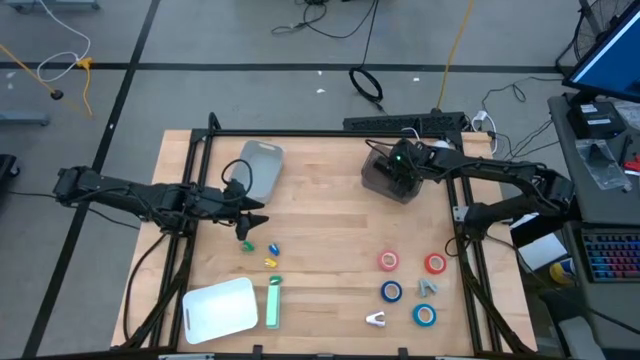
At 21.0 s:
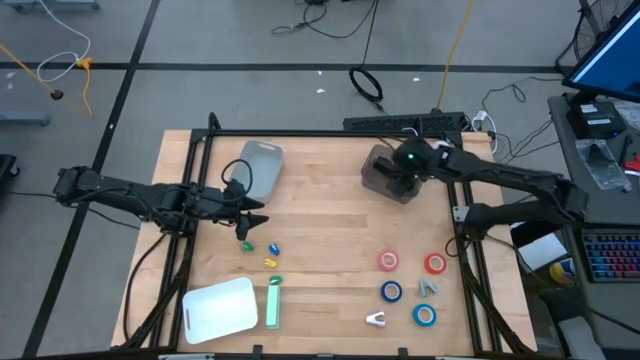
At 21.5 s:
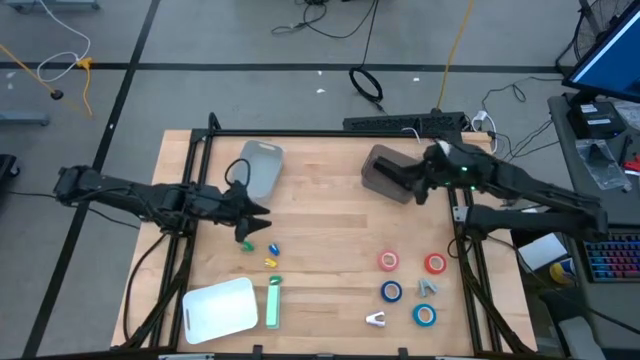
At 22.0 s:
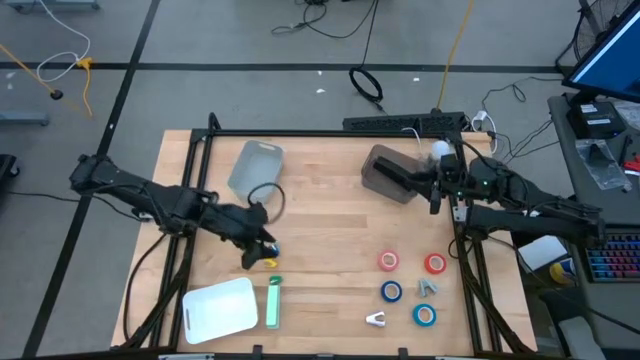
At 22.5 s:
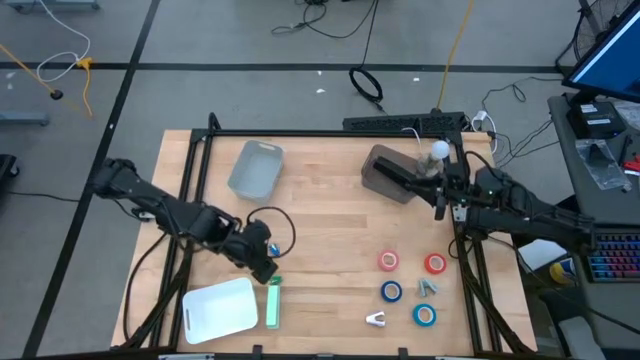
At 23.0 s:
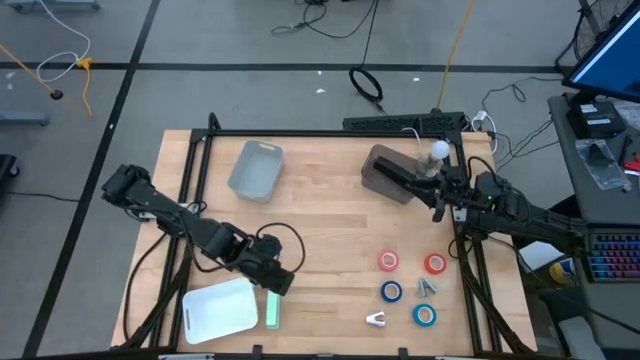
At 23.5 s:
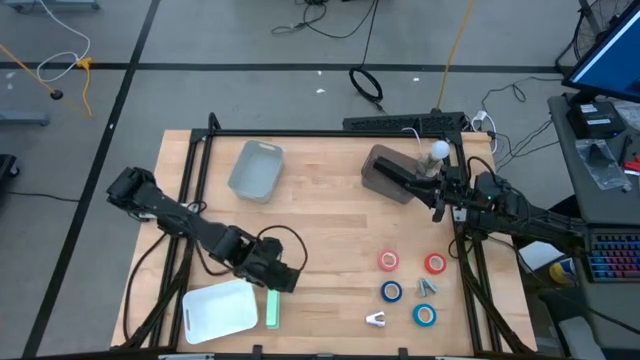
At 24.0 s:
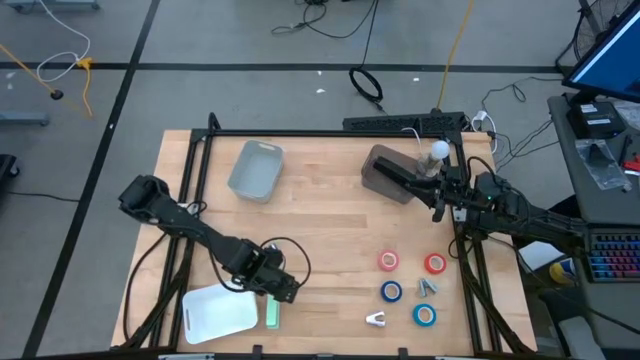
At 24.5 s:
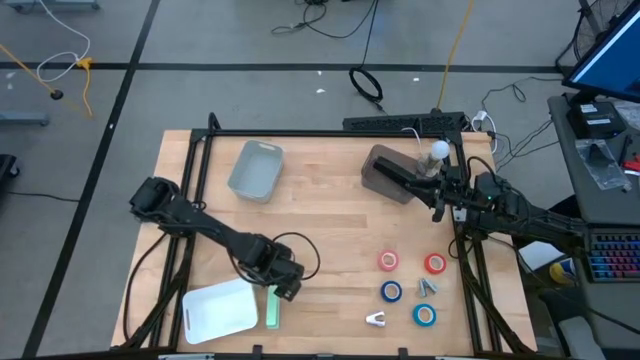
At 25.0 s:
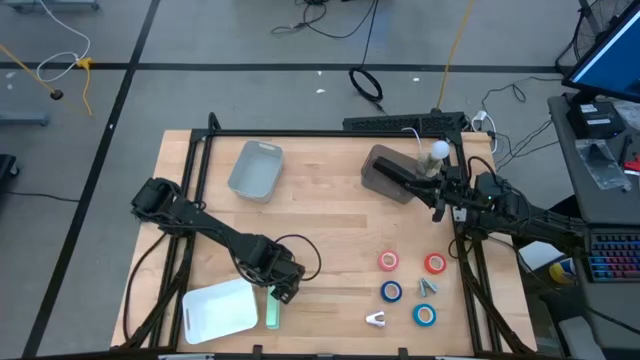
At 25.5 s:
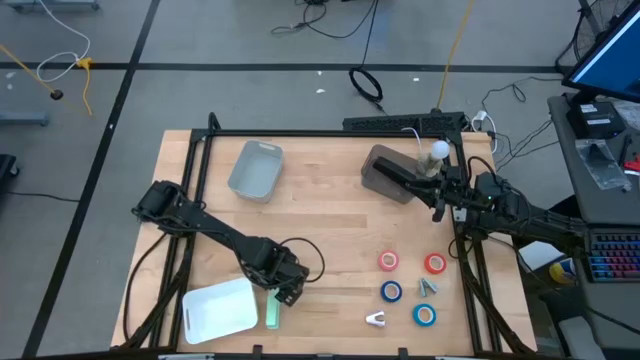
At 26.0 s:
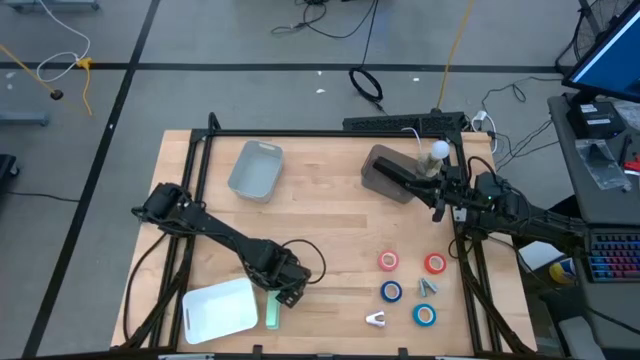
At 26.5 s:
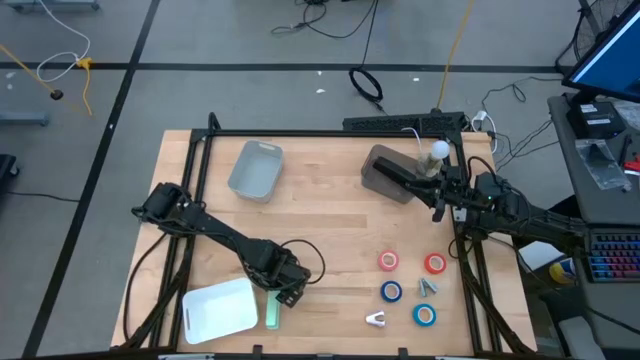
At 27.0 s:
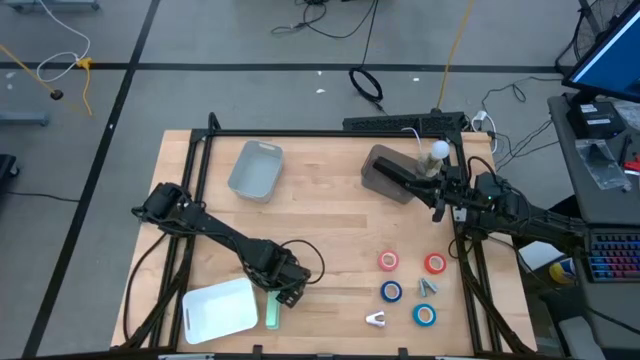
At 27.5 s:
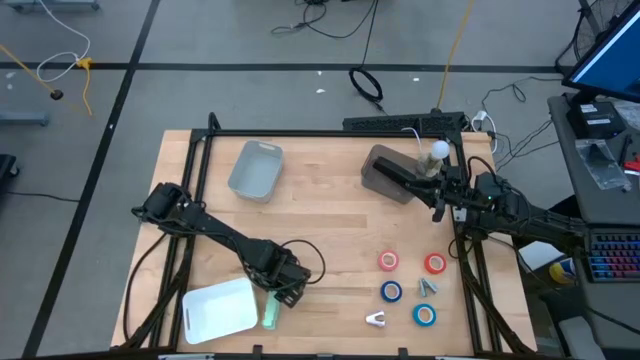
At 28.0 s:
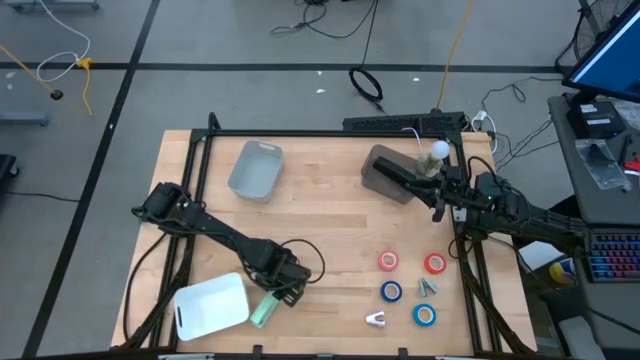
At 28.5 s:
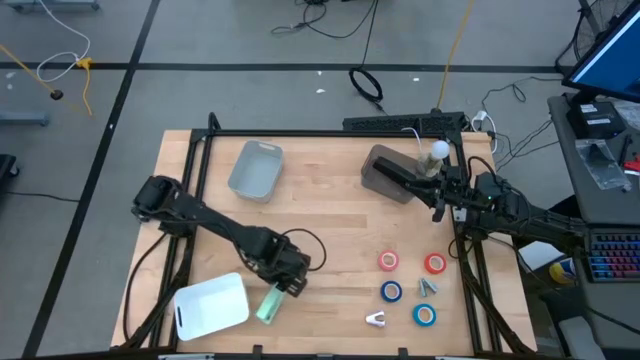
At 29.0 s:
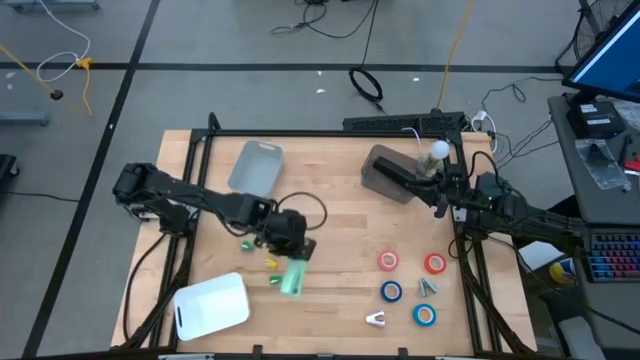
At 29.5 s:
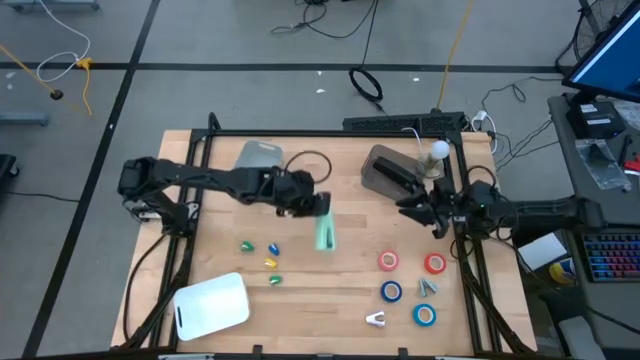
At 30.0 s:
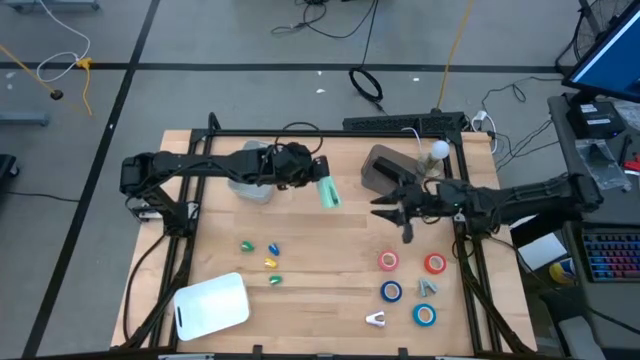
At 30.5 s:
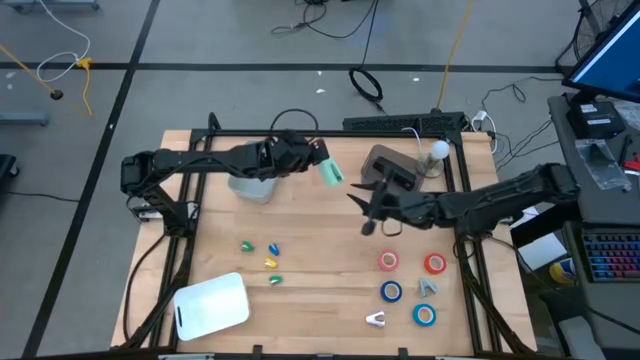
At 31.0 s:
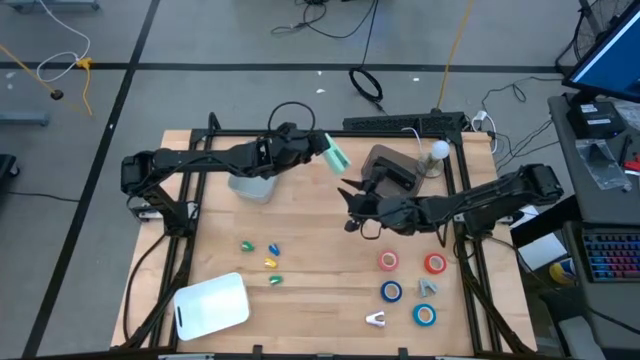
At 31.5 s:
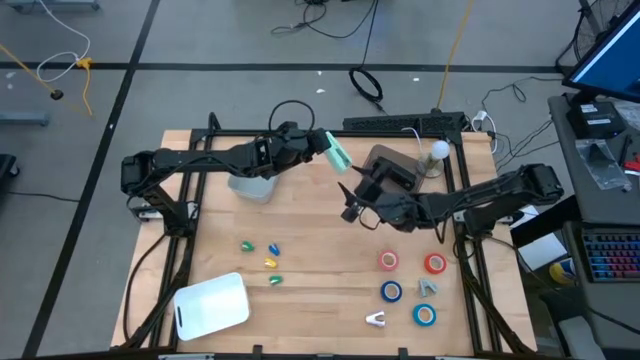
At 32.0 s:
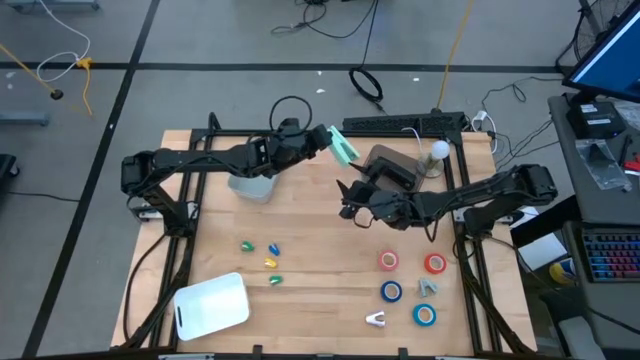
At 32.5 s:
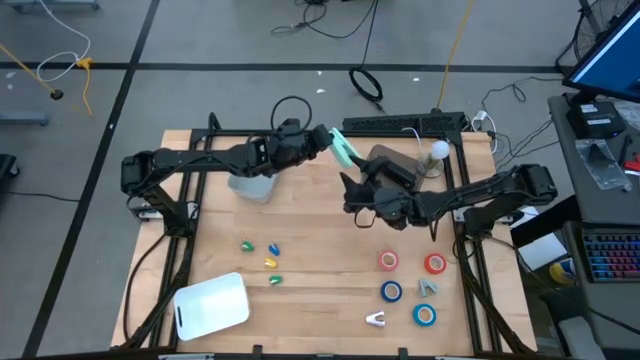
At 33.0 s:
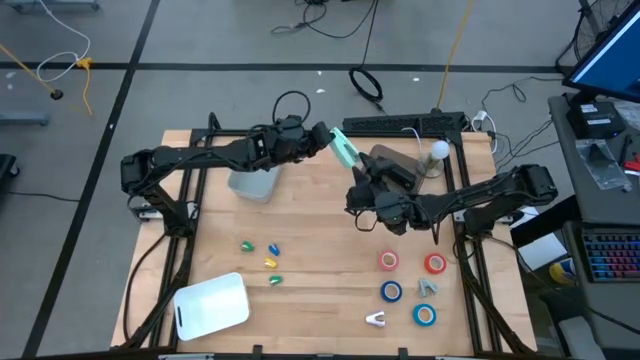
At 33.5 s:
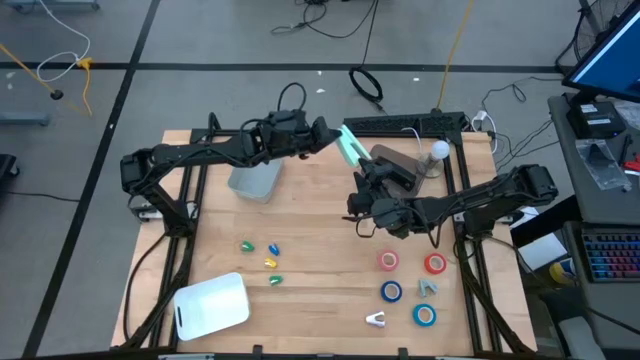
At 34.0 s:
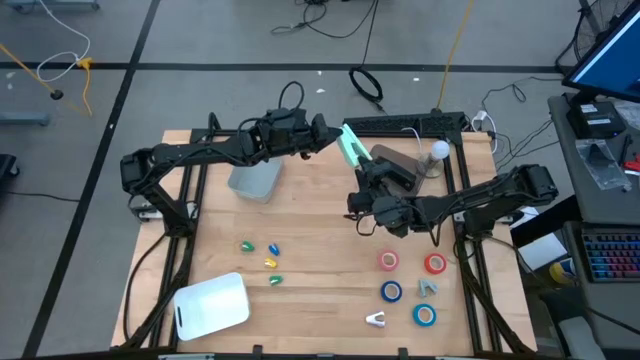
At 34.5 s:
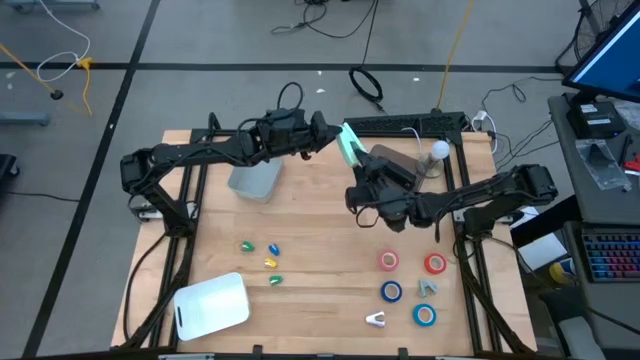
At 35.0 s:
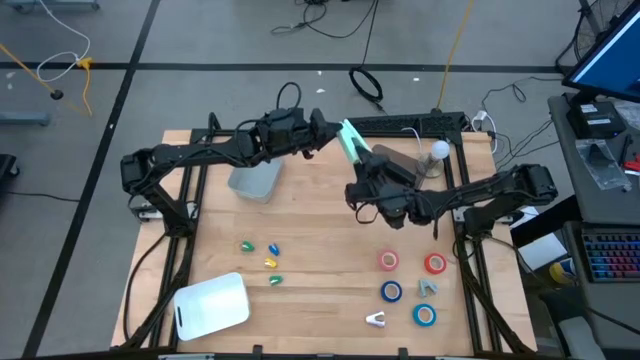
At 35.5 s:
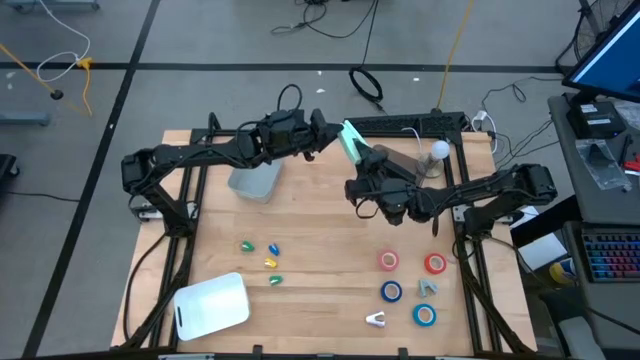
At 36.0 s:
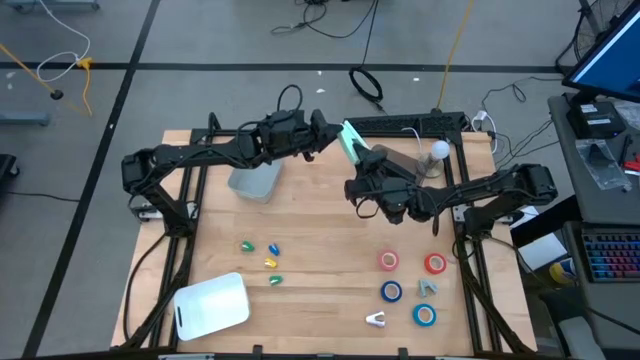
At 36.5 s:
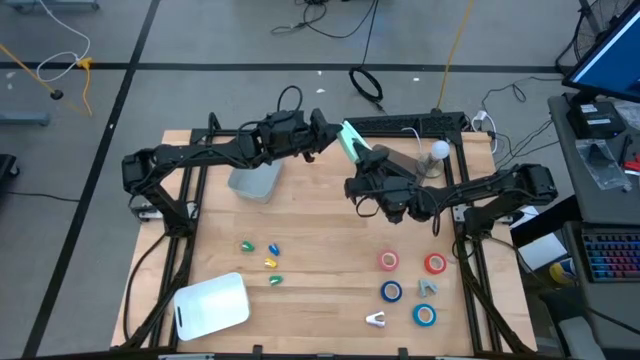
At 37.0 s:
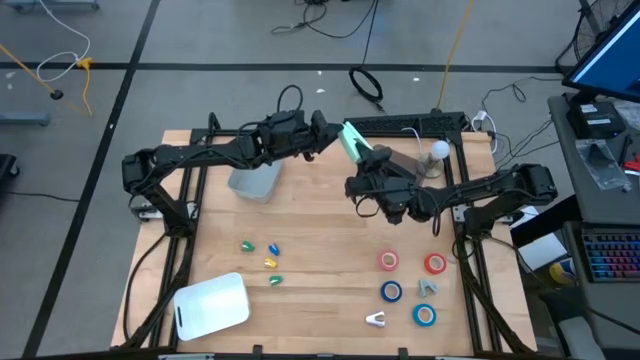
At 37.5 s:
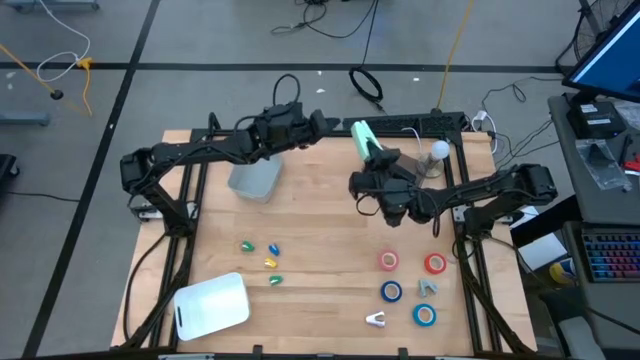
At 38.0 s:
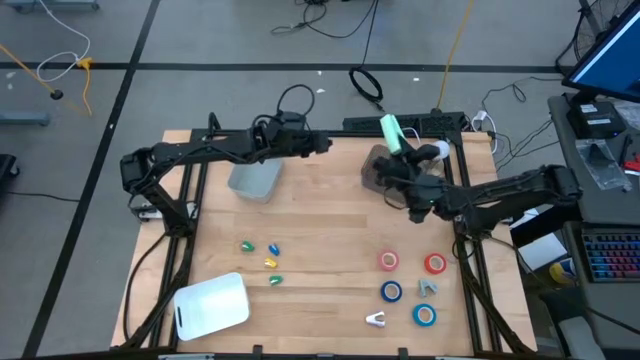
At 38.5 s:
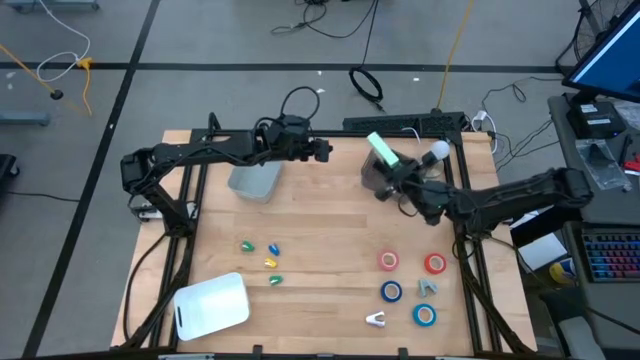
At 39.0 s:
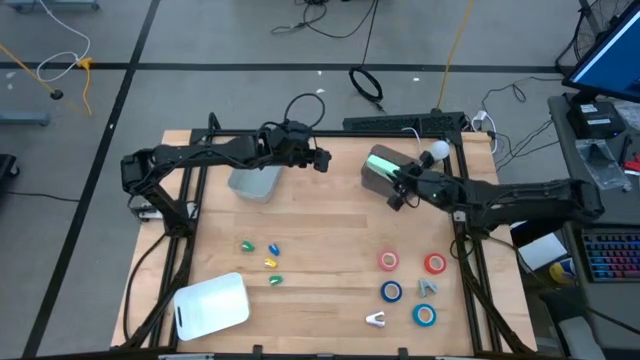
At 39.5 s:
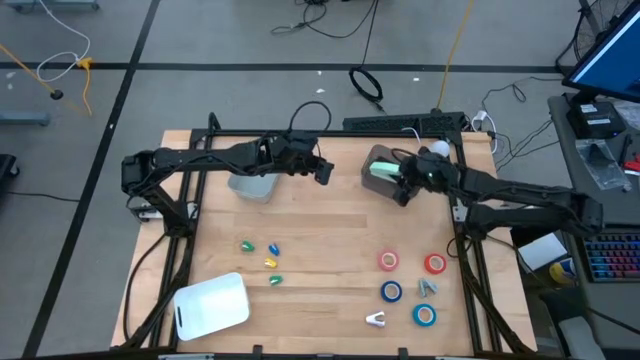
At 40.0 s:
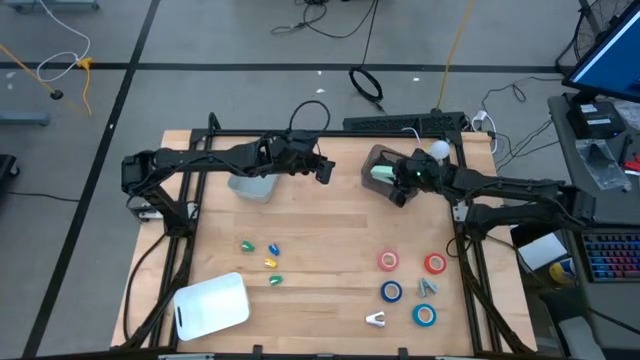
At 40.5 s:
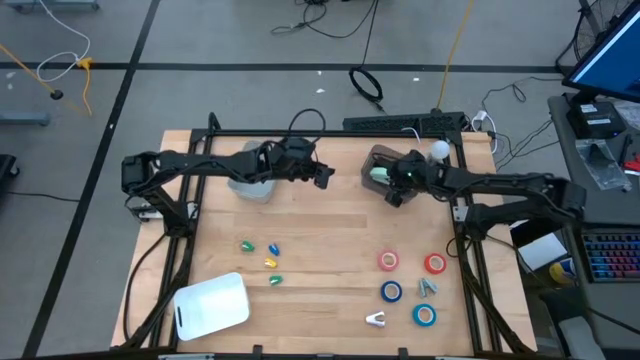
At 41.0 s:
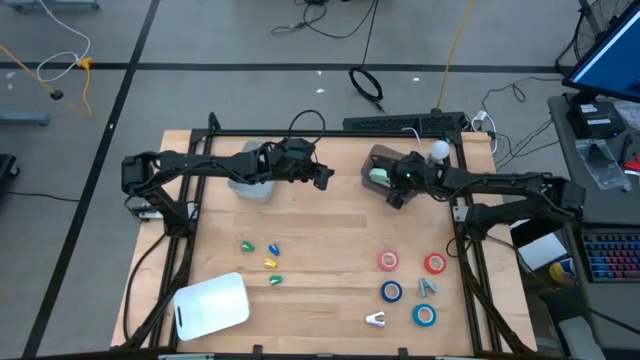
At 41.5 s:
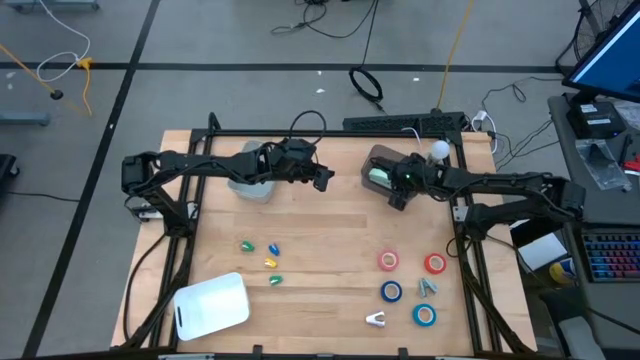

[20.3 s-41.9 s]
Task: Pick and place Stapler, Stapler remover, tape
Put the big light green stapler into the black bin
